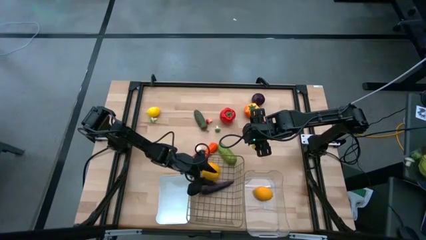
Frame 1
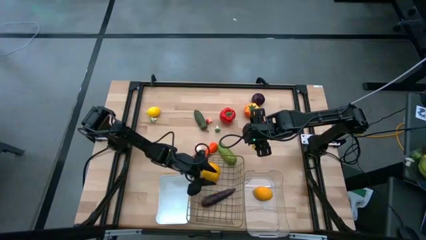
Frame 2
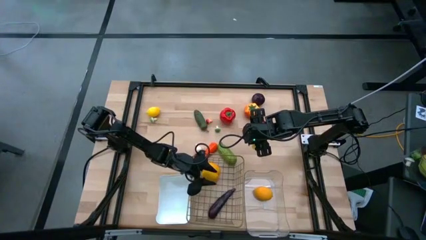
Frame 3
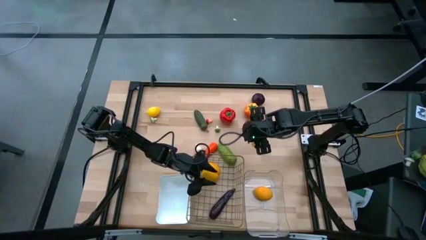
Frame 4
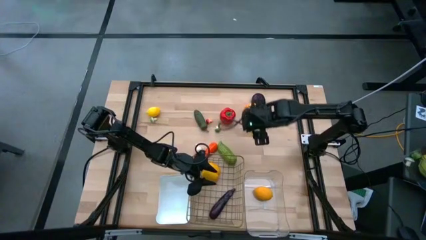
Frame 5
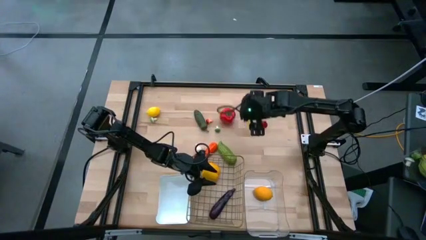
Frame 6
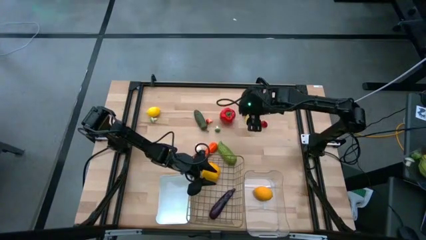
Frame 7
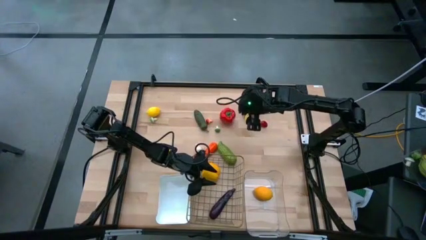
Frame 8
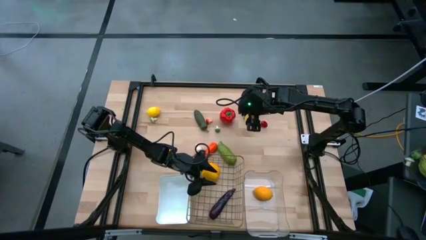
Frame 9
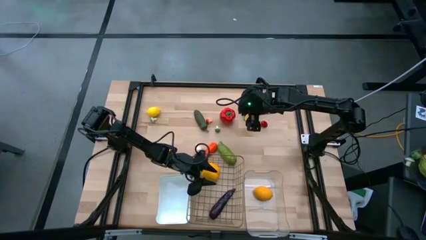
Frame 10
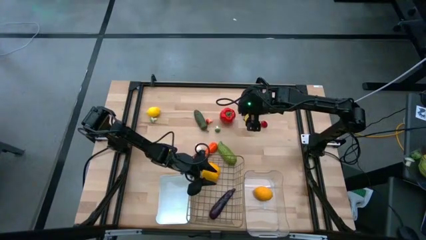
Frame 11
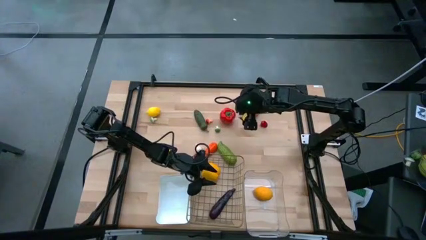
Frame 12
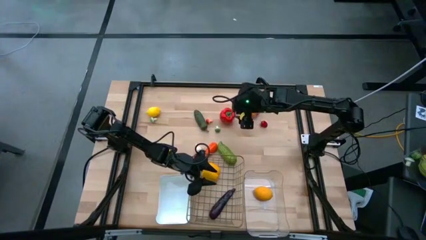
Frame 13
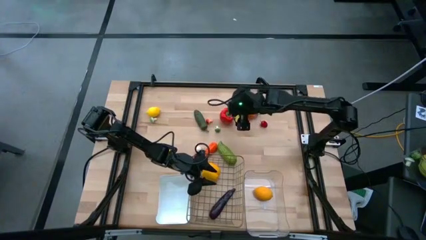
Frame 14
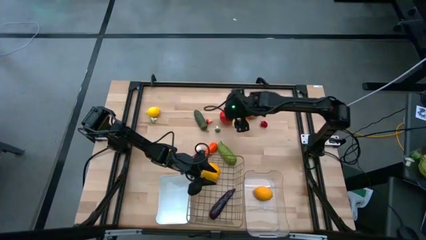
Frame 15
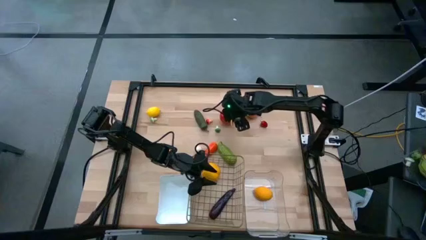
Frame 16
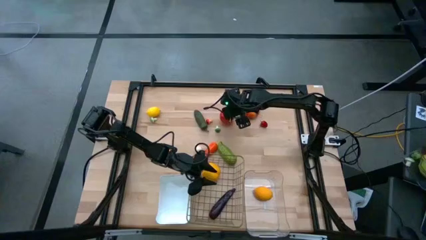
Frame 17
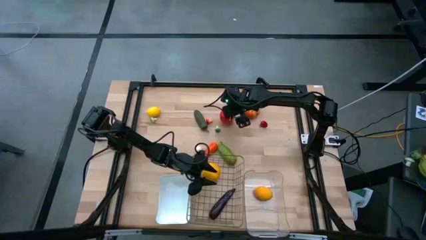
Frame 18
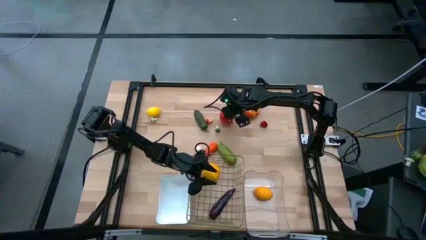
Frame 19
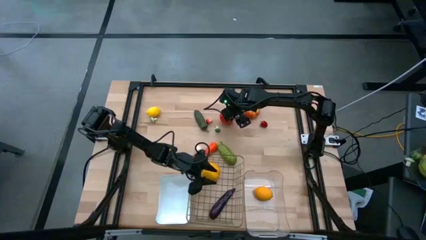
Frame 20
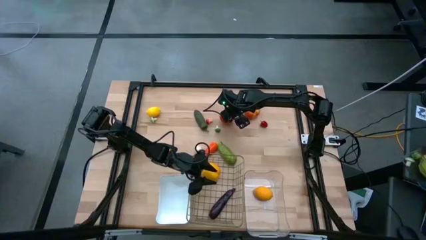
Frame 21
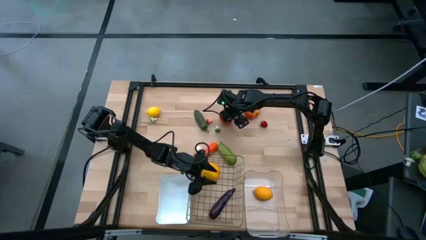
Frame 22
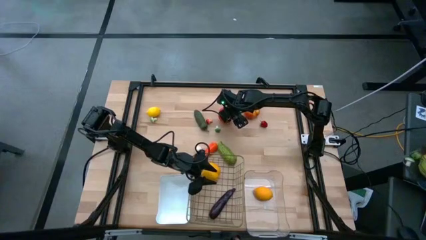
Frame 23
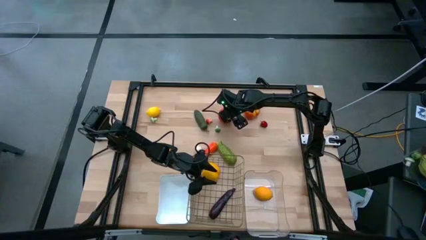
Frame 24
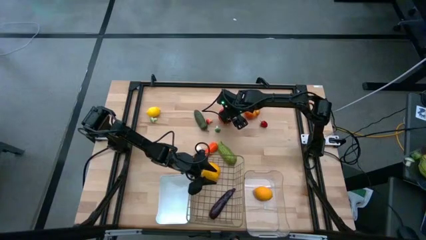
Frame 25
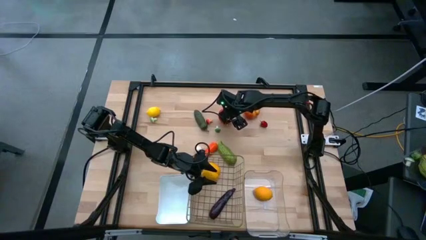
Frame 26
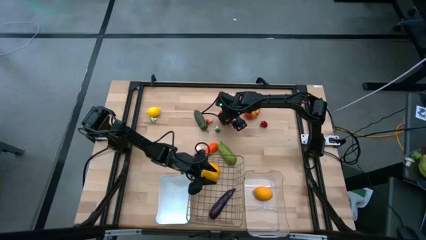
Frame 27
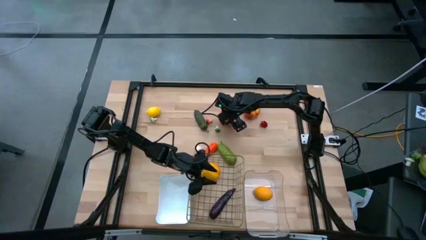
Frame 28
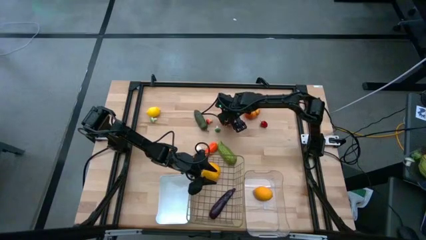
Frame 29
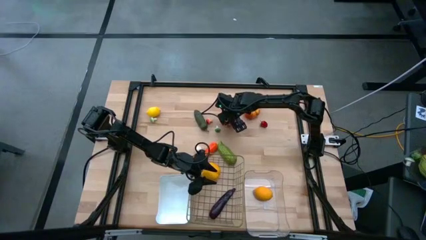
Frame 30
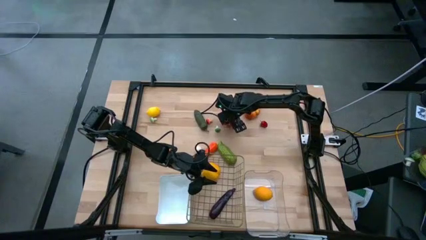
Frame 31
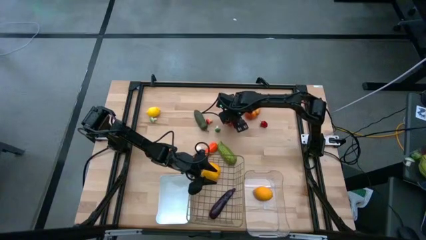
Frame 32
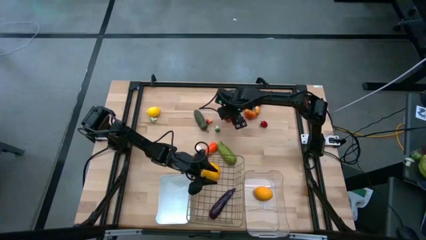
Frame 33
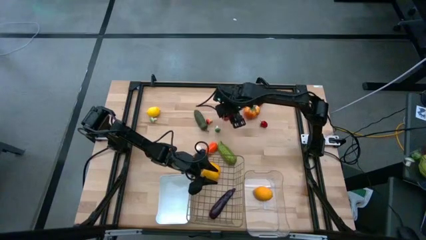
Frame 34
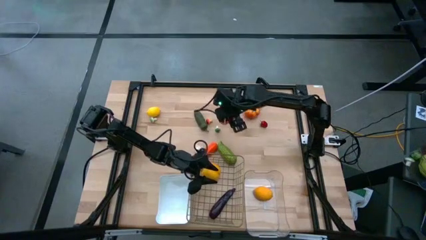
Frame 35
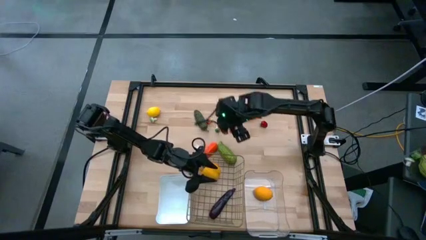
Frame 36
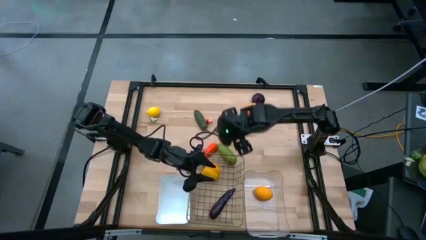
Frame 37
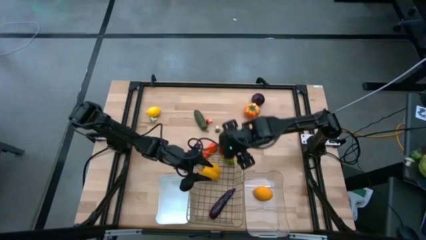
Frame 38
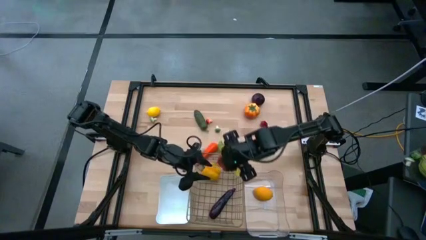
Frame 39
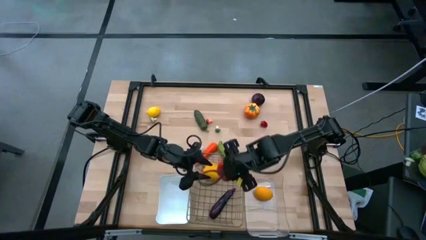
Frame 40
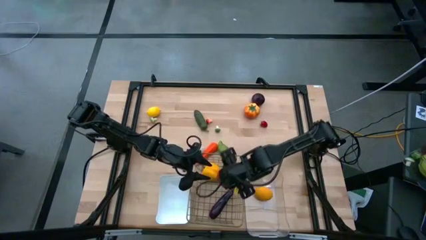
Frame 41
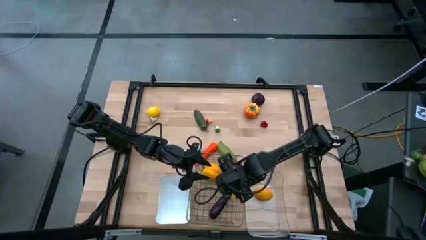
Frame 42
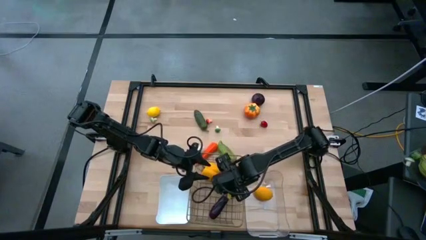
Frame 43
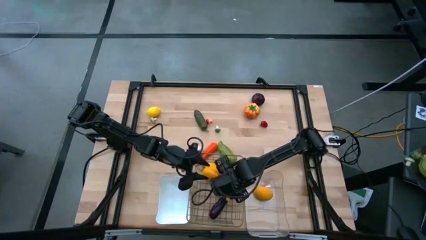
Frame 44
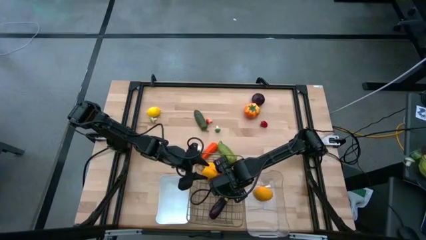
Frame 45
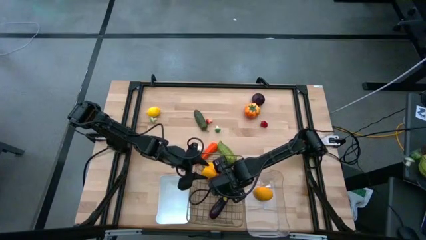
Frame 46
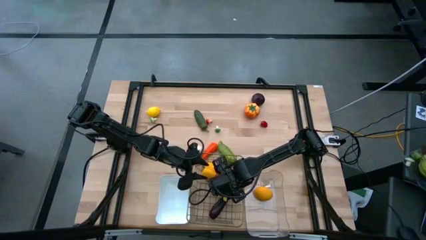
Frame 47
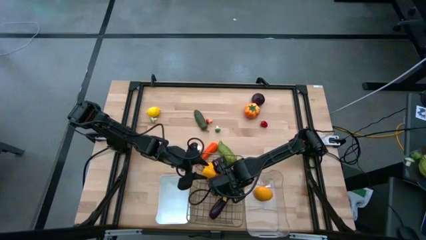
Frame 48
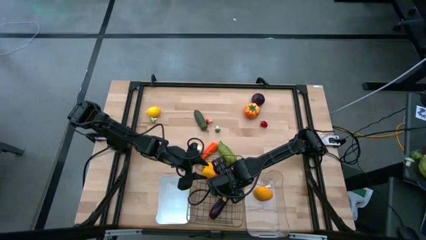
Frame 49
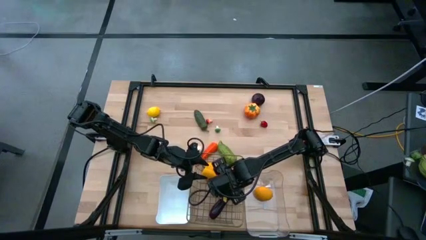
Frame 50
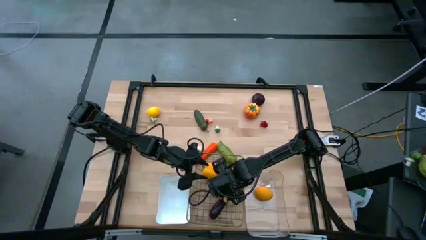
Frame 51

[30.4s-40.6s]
Task: Sort produce into baskets
Put the large red bell pepper into the wire basket

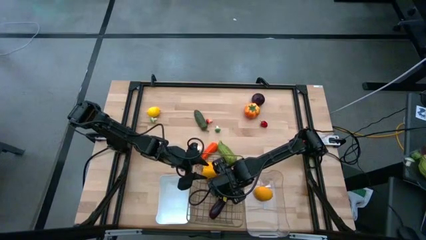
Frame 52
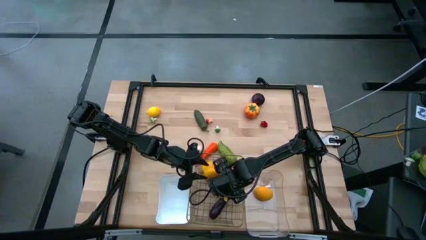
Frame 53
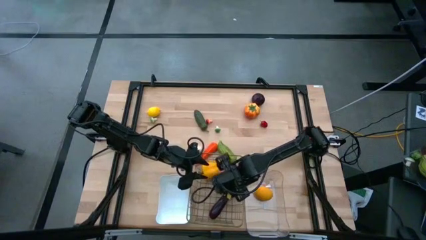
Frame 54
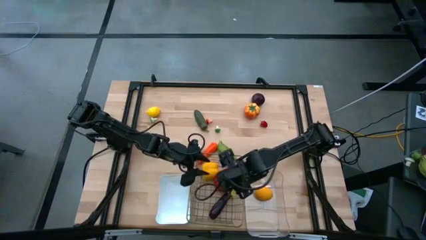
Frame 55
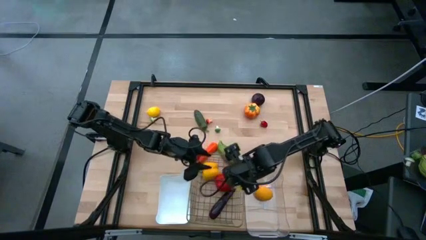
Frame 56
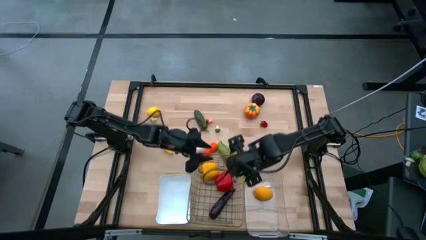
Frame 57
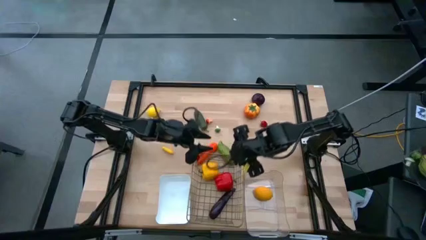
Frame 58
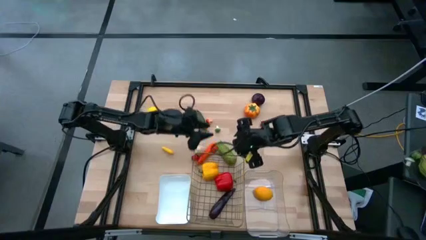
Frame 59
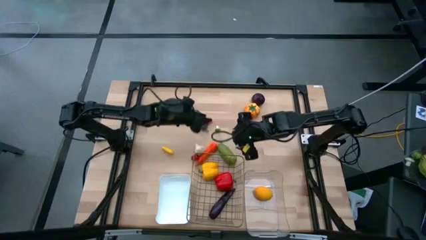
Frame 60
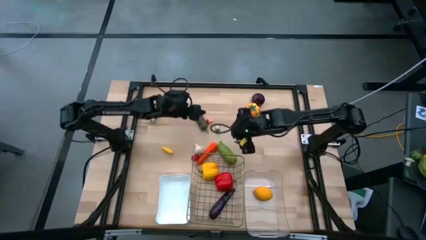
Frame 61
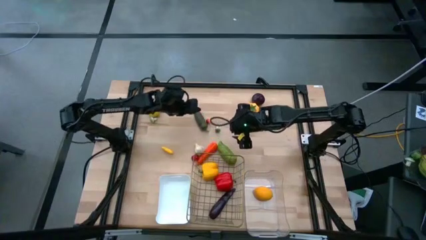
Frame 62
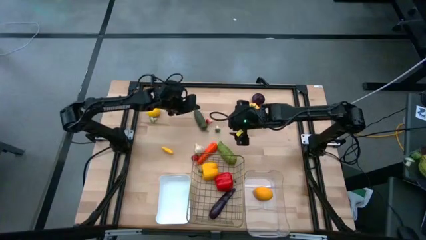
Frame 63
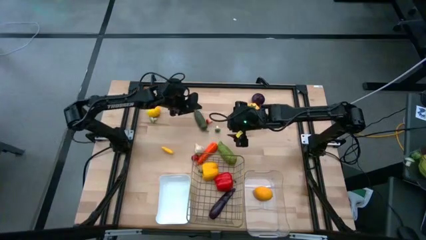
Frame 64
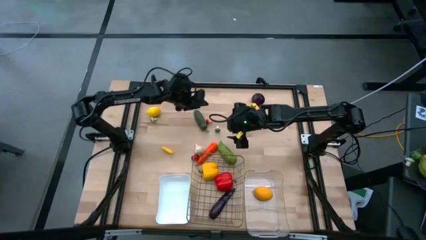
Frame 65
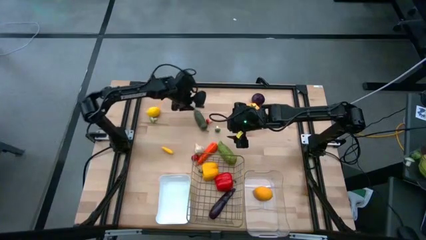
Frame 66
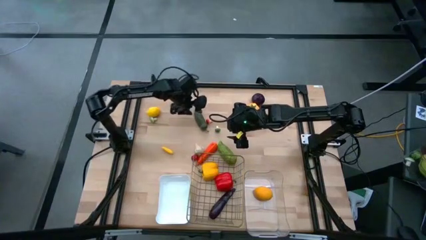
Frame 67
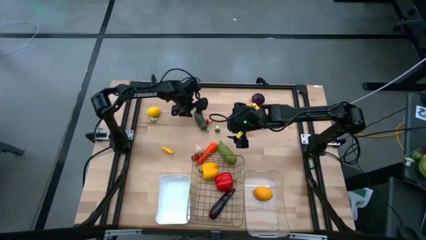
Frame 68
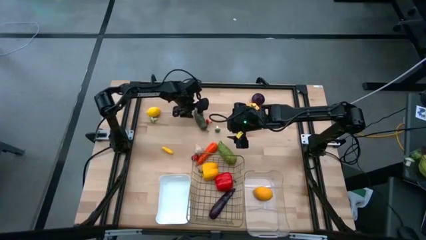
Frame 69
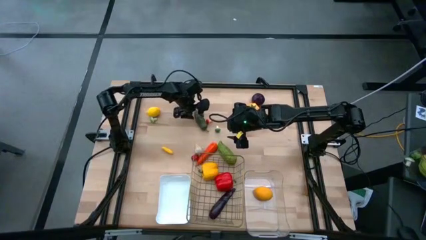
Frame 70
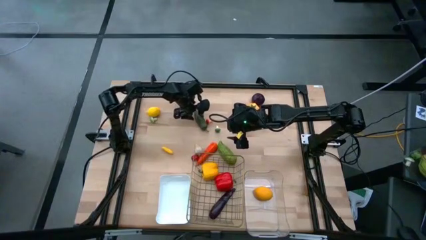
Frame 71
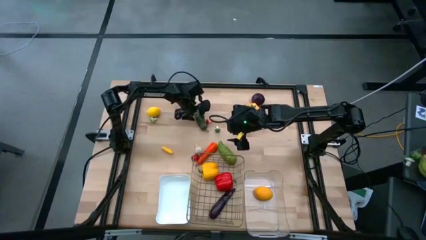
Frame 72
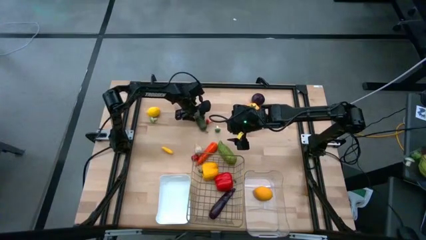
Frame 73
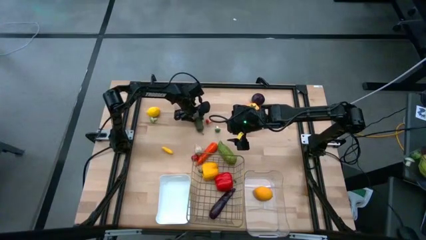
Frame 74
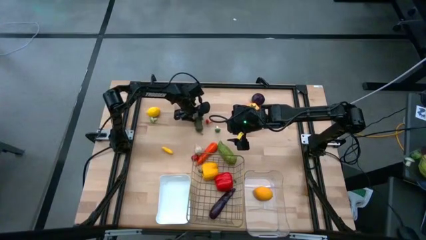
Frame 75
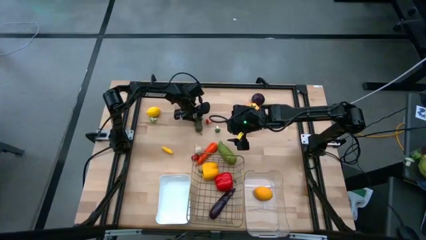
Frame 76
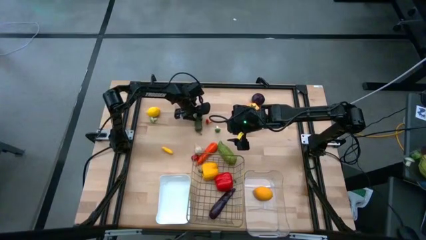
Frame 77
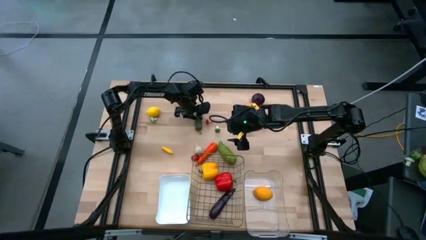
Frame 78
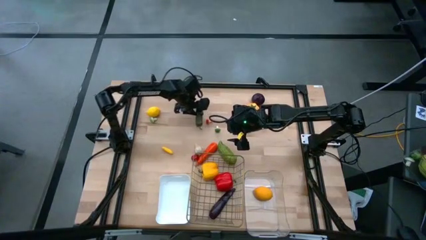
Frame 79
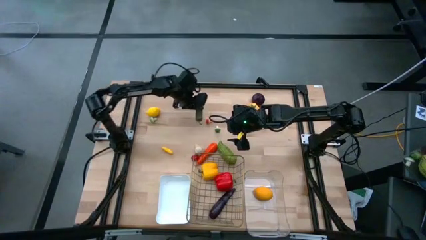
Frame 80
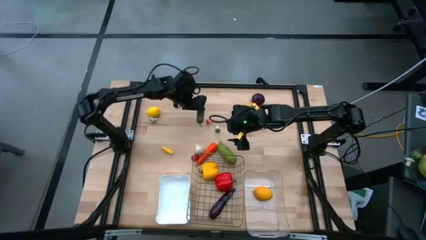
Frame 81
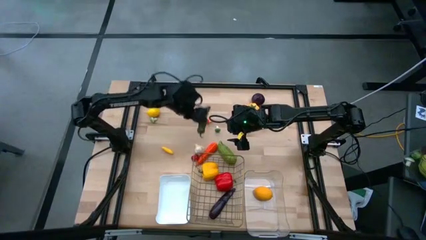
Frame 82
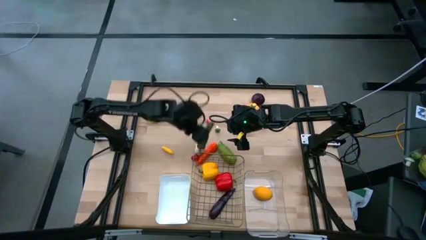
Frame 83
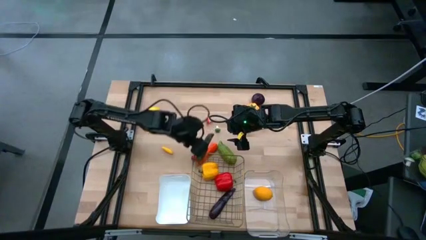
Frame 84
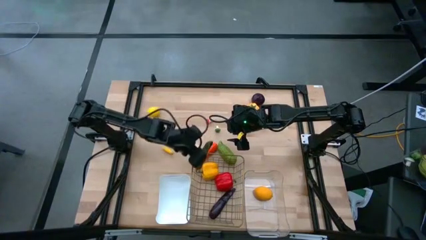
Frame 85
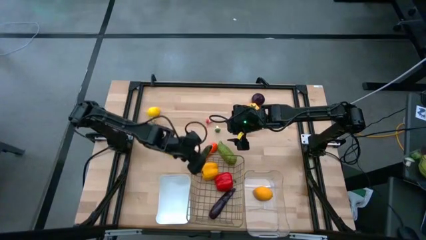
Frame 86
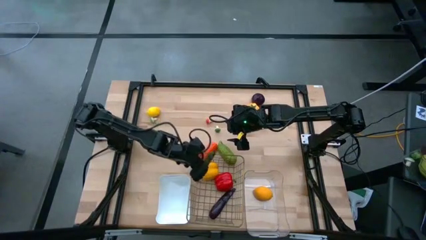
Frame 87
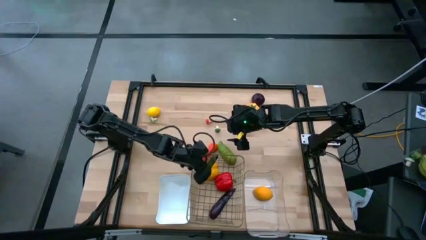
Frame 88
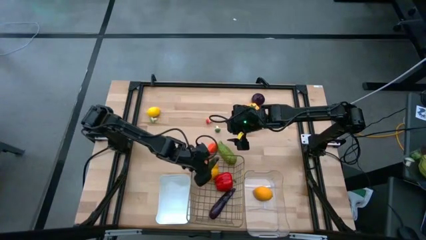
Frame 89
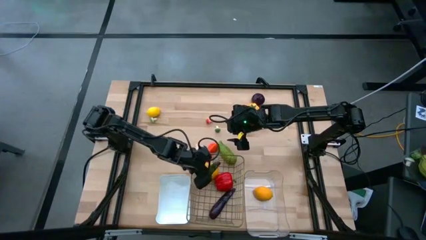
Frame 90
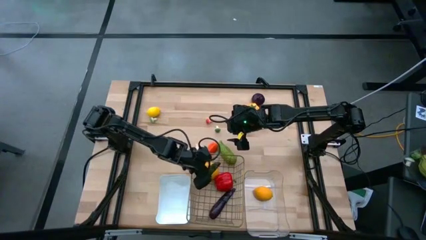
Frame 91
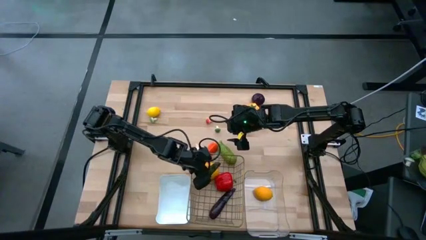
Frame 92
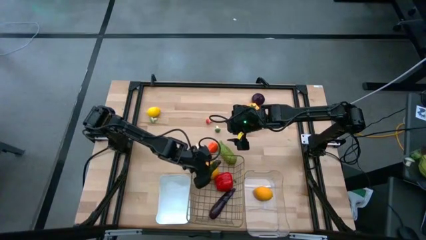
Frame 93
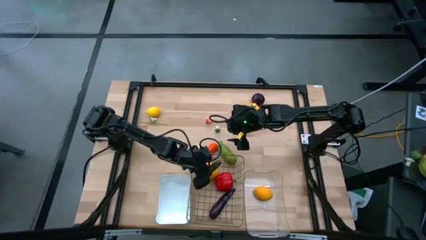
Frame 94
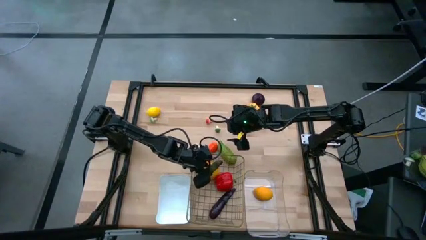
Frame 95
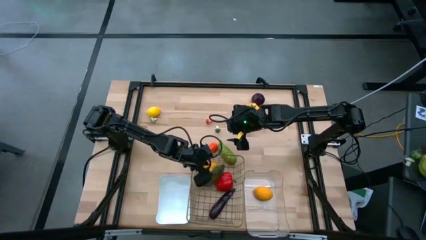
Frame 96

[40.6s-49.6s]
Put the chili pepper into the wire basket
